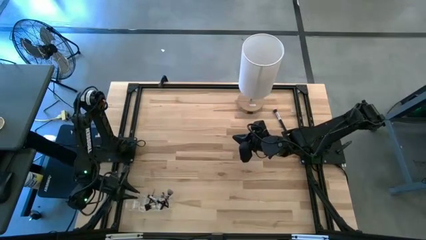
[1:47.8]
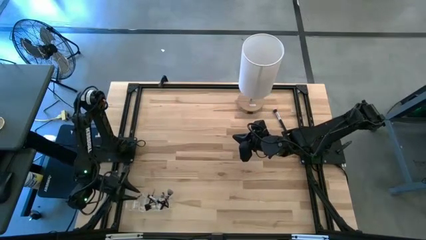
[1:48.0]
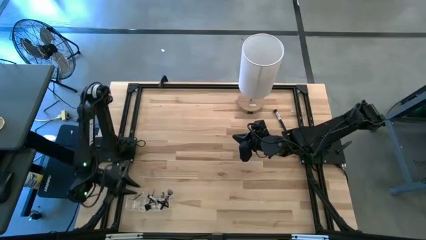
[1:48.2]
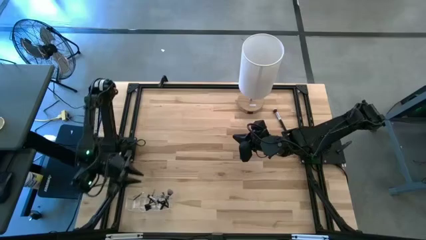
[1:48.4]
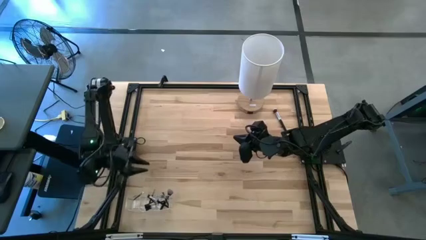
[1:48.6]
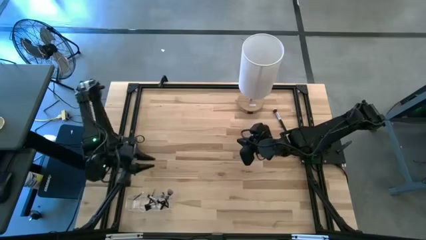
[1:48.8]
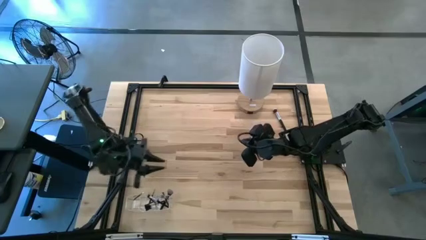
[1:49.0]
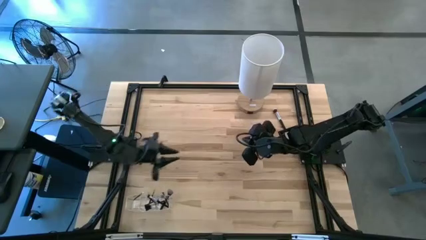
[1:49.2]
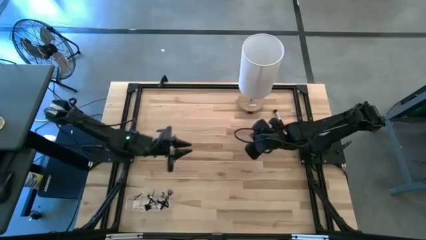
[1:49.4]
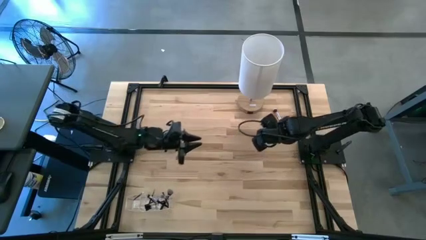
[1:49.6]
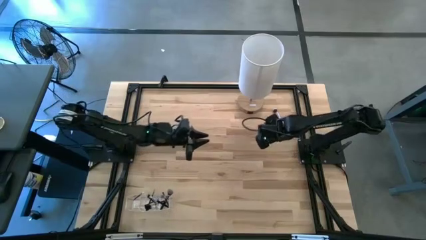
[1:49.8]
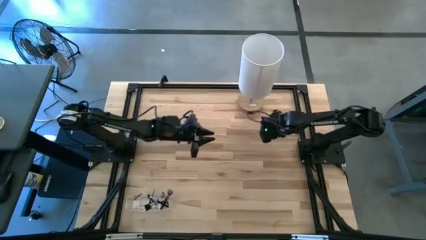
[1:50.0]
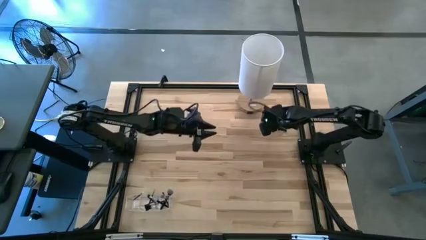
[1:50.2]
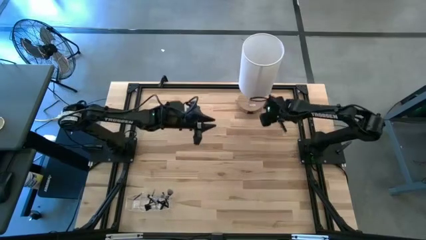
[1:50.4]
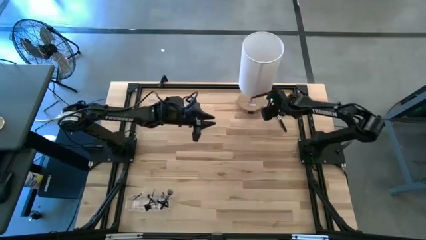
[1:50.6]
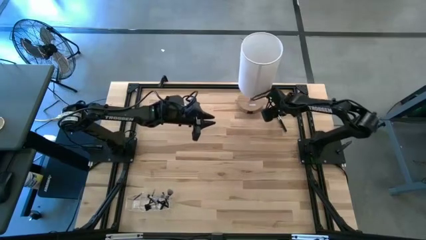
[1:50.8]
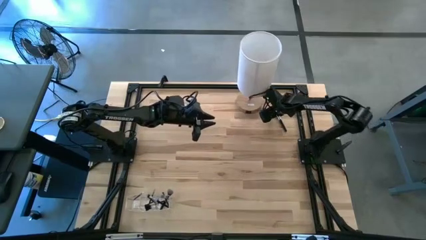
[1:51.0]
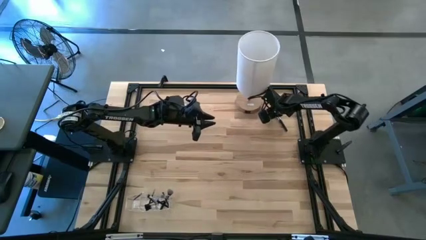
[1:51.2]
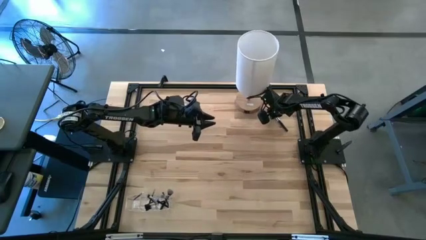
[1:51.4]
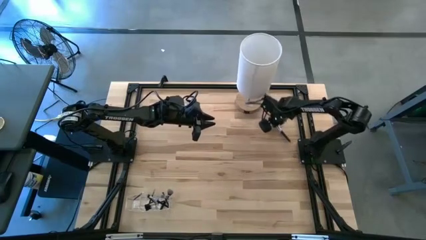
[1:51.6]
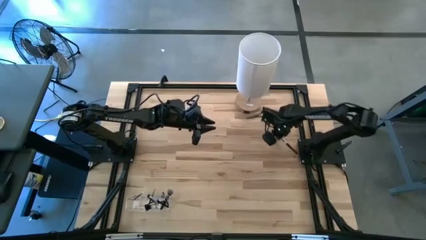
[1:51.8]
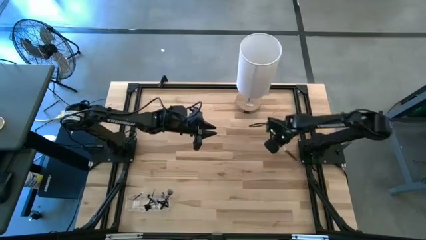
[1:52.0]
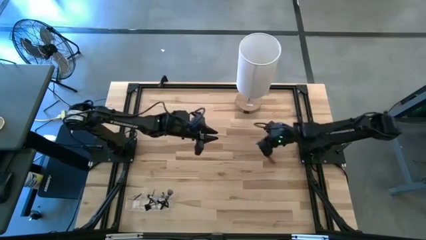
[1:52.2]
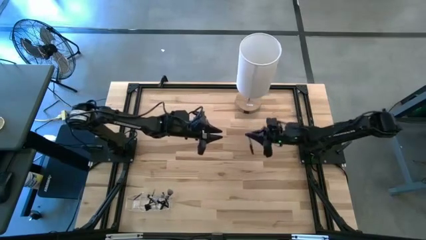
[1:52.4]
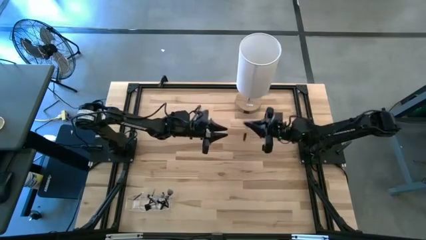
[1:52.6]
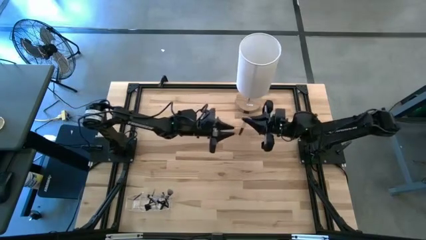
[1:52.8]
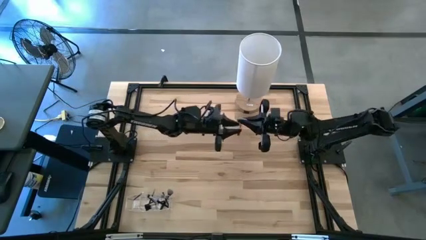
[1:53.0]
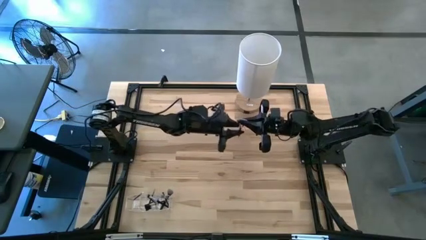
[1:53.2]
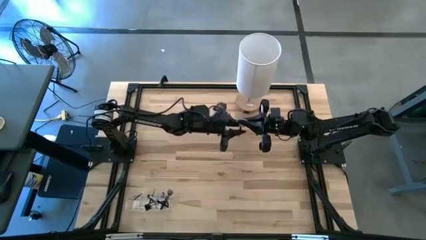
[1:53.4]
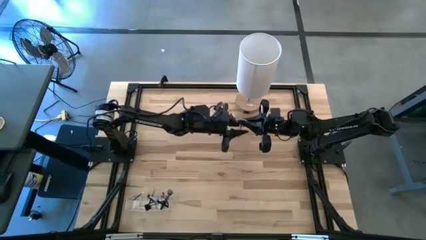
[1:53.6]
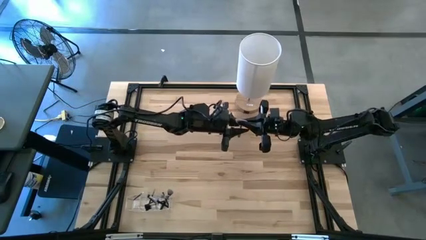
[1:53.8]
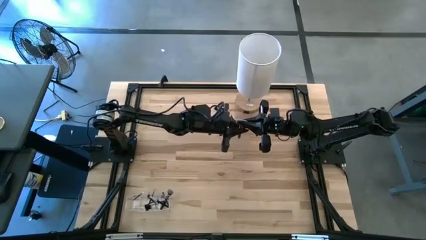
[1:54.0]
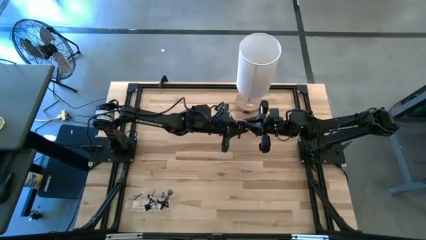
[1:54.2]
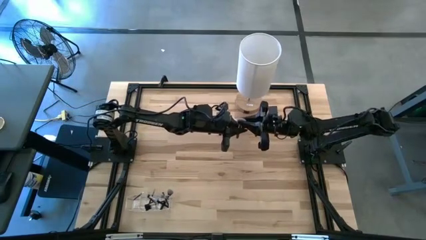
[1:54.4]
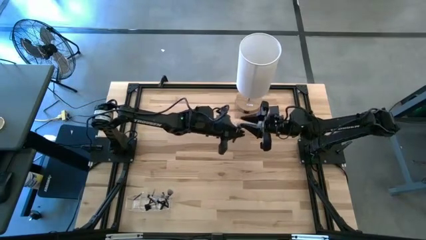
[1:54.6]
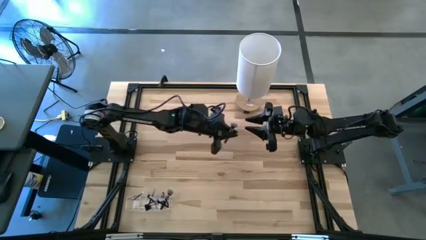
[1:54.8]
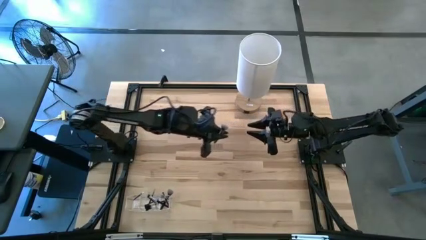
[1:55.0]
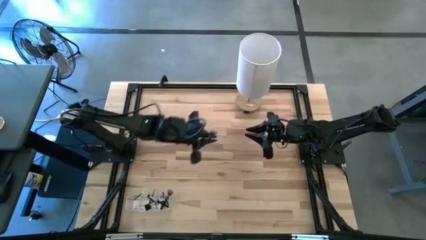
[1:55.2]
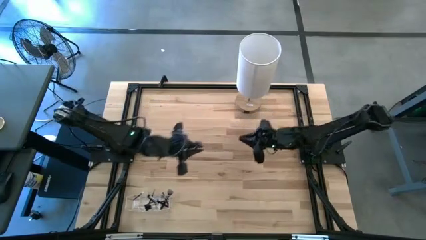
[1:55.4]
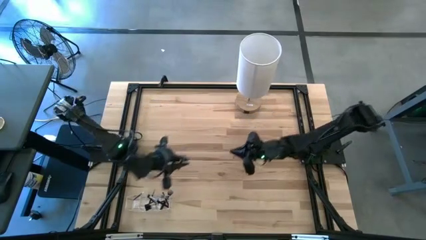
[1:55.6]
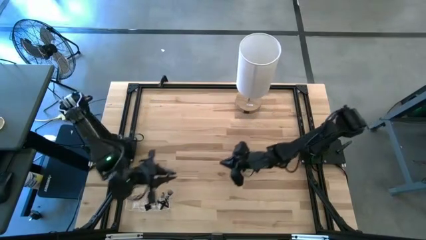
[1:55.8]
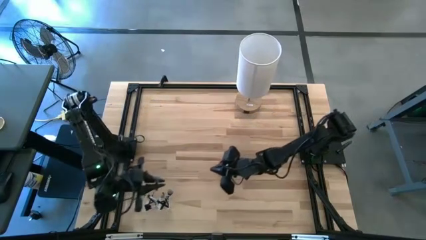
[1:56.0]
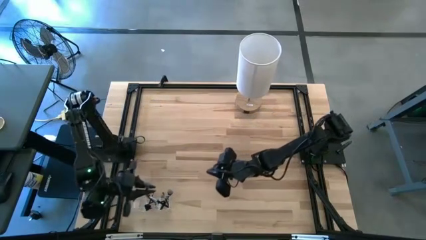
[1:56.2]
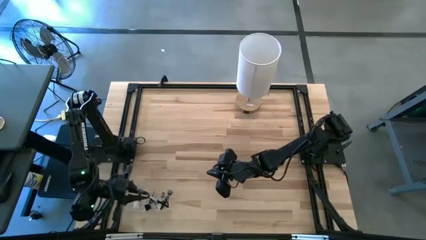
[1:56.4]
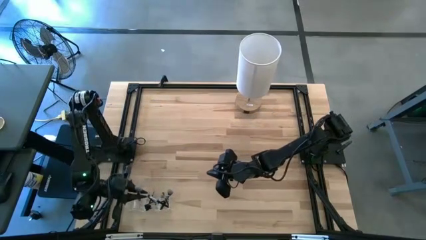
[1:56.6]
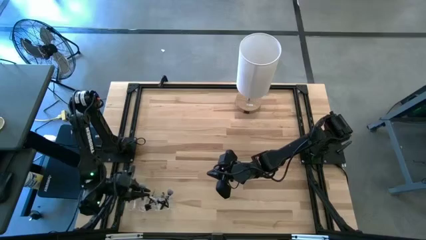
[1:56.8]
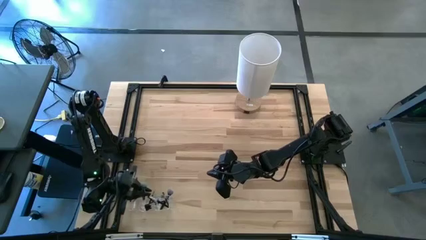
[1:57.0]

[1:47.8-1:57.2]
Task: Put items in baskets/containers
Put the powder brush into the transparent organizer

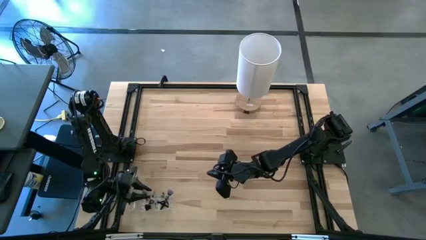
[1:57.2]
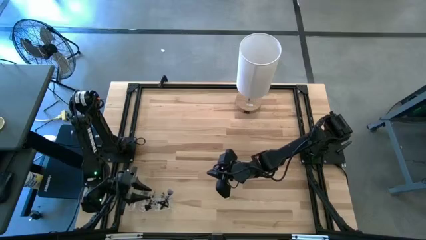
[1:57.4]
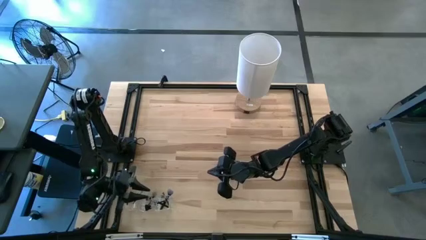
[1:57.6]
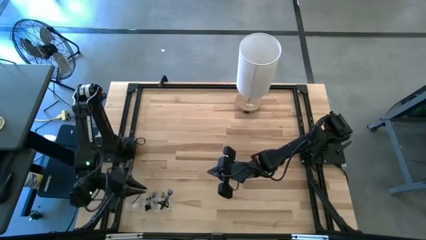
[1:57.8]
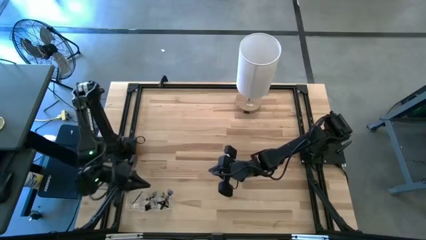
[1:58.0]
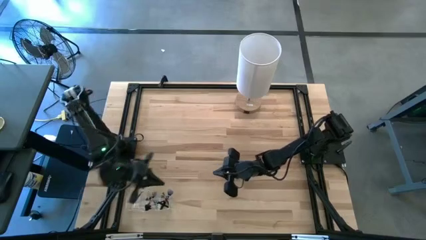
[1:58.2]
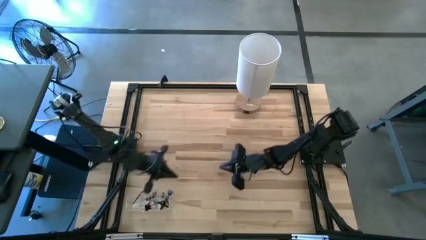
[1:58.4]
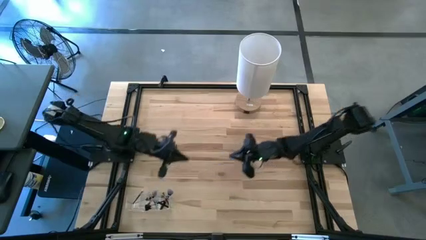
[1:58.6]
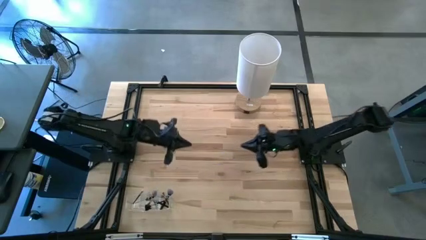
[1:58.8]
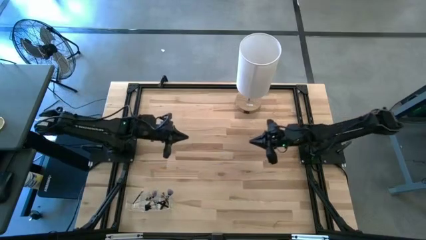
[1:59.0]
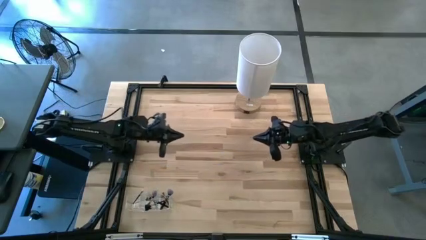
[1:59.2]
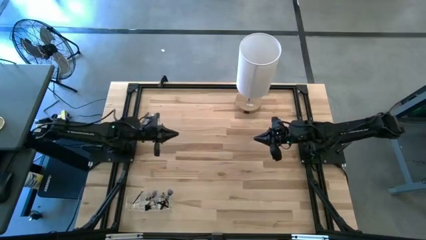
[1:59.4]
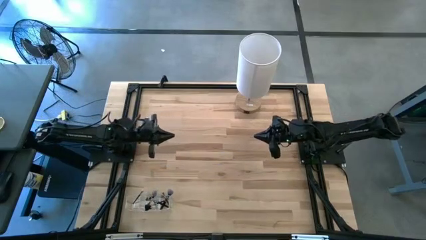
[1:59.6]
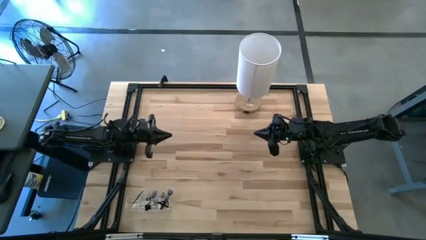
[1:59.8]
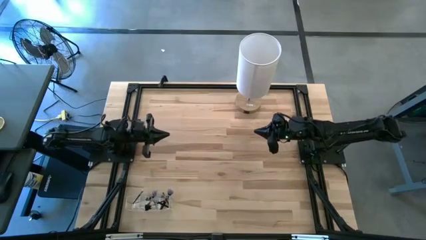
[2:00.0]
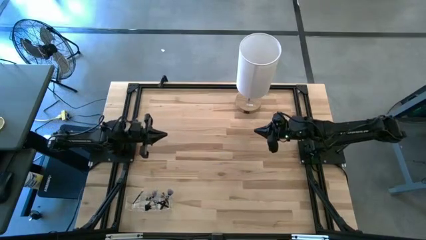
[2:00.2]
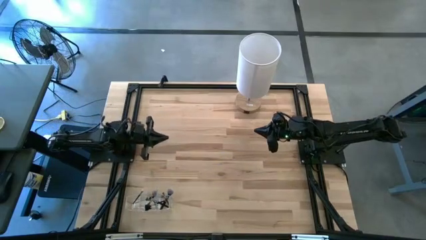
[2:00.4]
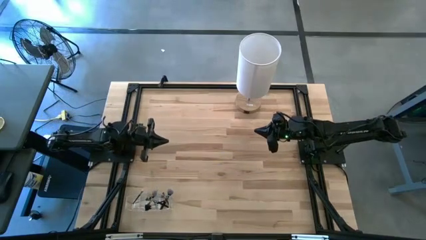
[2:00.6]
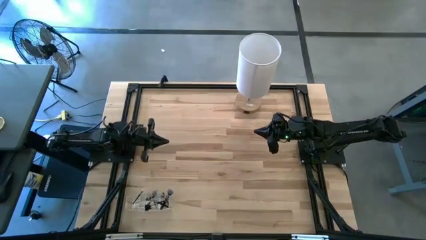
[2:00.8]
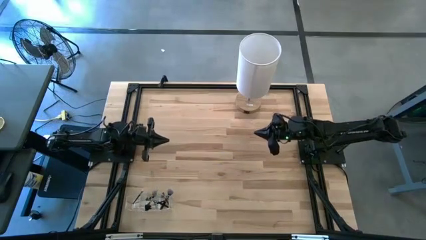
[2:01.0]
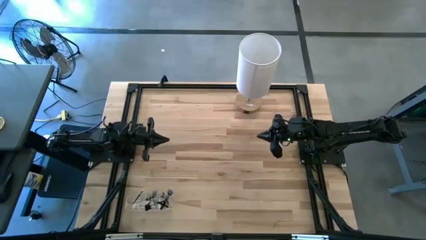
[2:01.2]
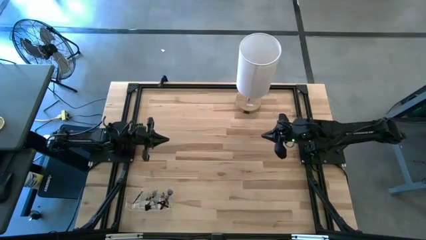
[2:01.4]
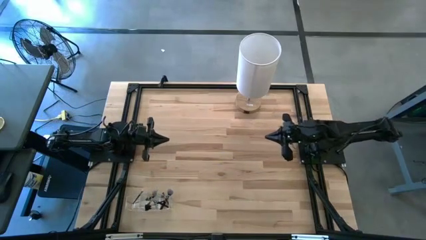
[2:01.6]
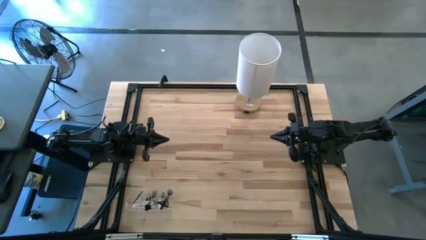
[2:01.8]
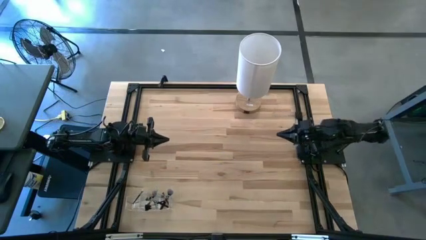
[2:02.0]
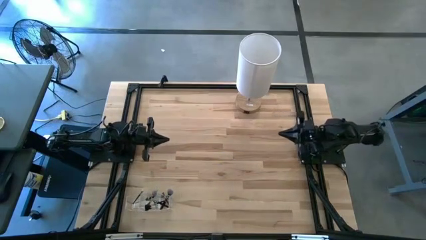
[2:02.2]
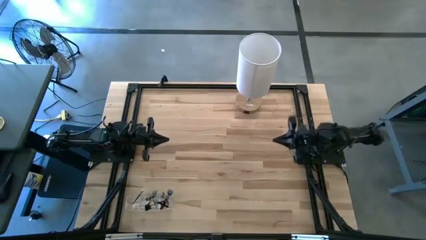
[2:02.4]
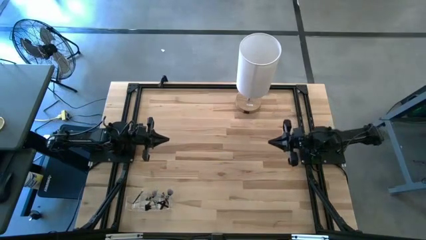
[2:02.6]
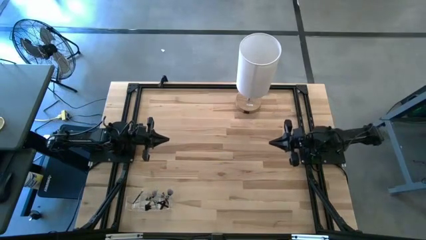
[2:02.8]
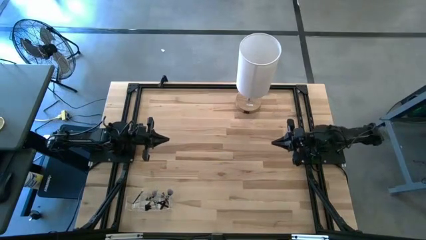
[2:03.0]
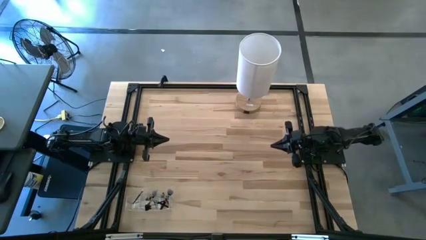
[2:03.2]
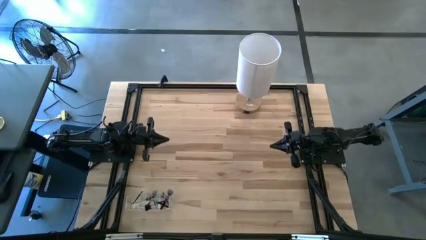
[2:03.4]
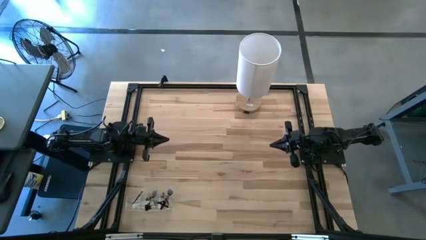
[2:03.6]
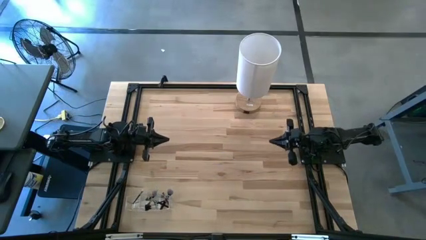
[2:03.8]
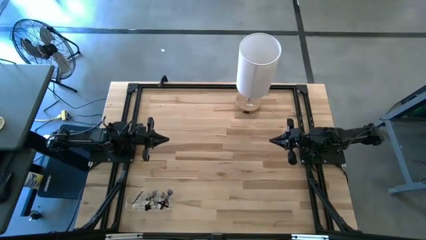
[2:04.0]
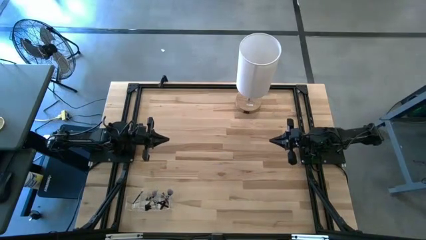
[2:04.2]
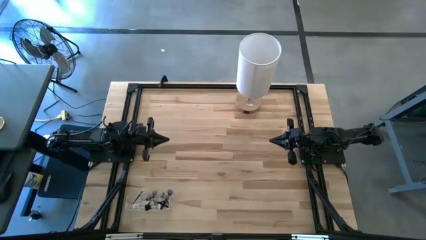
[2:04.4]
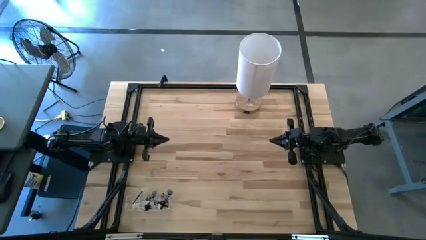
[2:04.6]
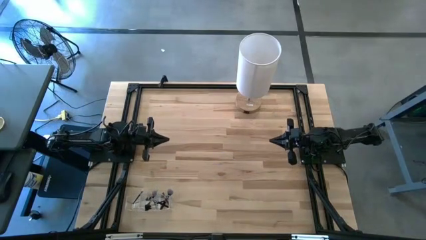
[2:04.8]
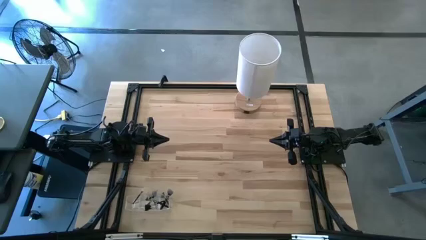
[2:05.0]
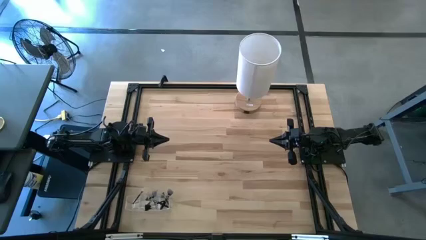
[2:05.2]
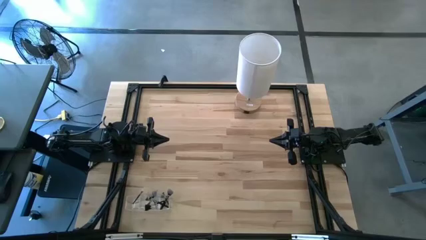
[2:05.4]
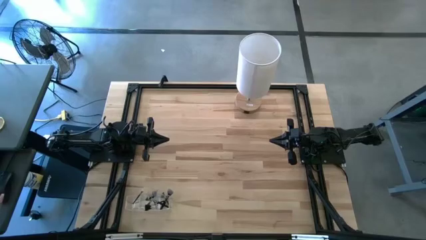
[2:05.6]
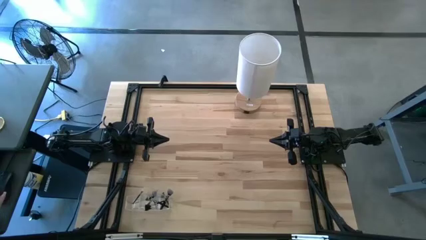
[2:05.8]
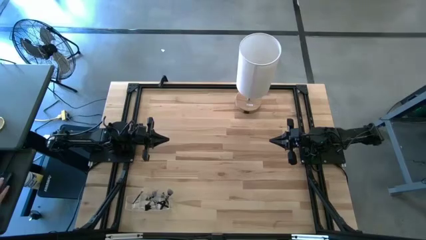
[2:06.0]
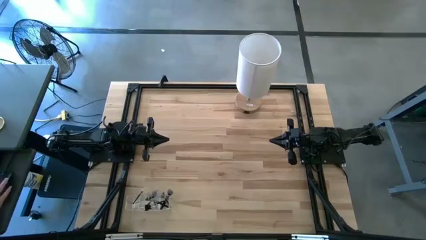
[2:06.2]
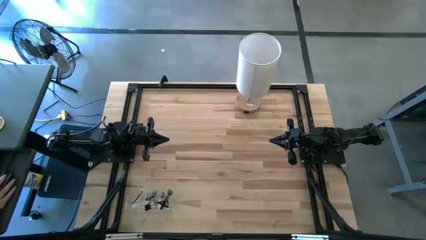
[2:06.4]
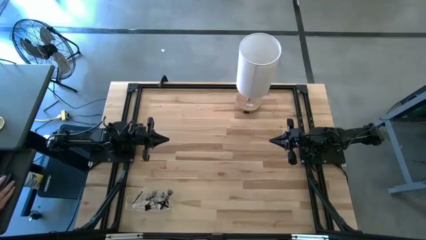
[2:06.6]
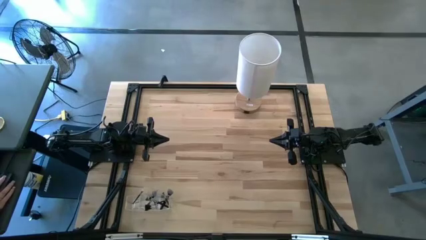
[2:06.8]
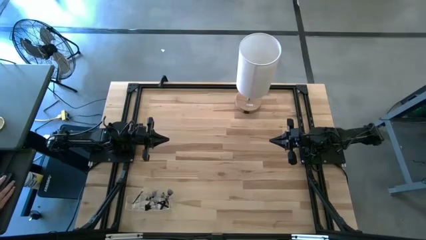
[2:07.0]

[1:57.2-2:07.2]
Return to Home Position
